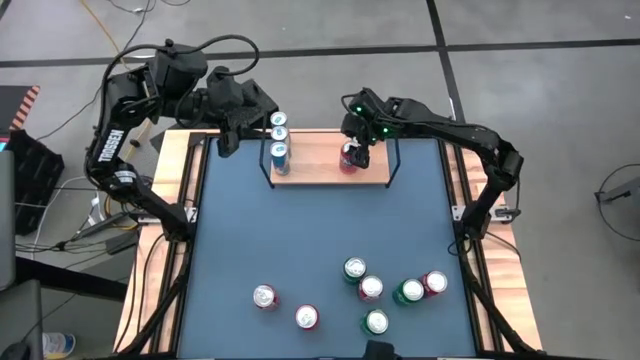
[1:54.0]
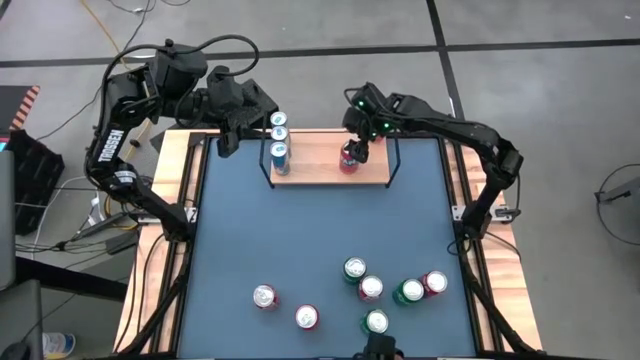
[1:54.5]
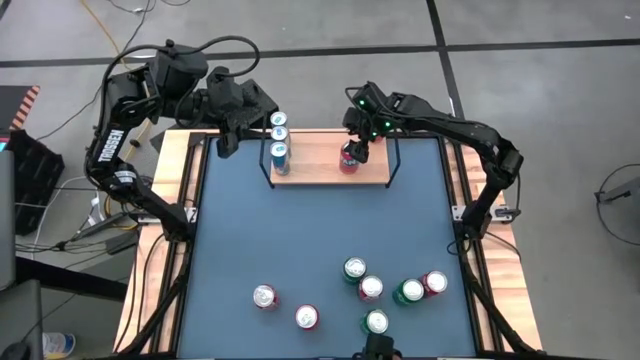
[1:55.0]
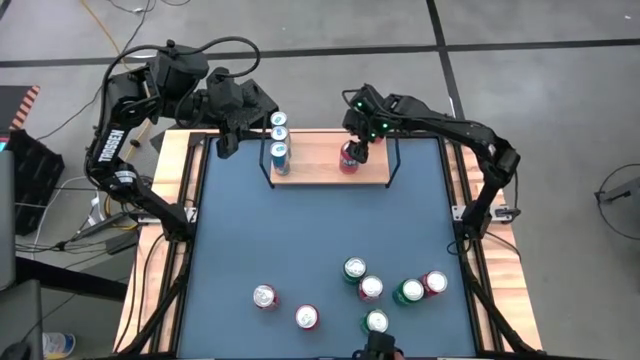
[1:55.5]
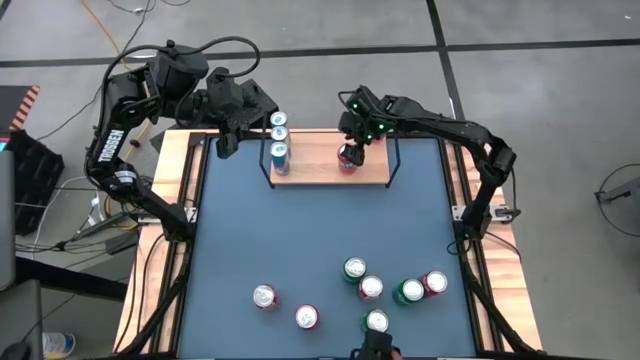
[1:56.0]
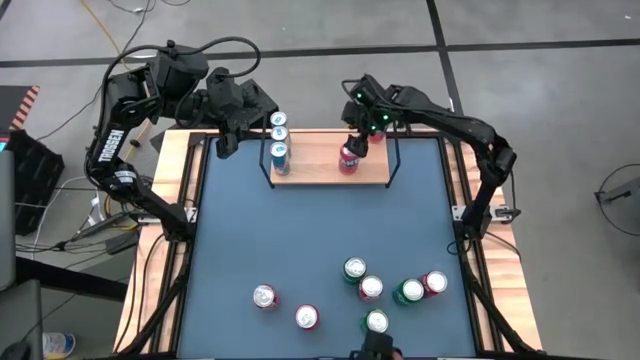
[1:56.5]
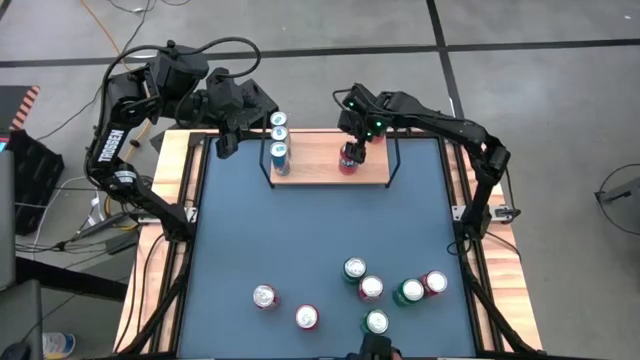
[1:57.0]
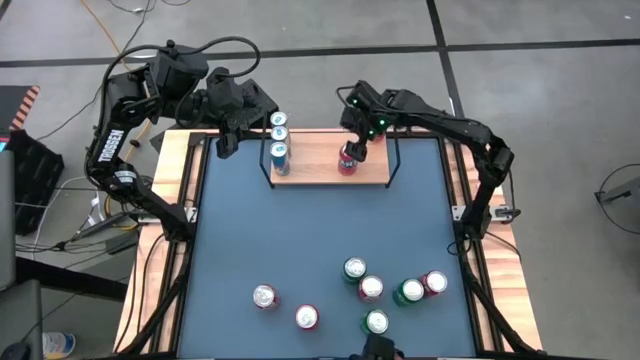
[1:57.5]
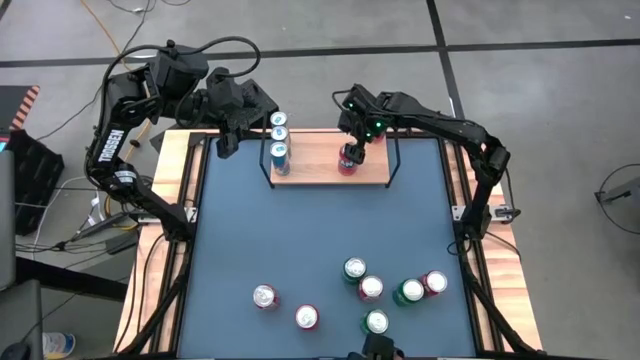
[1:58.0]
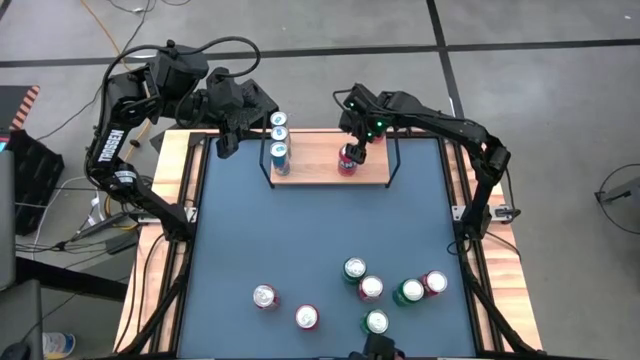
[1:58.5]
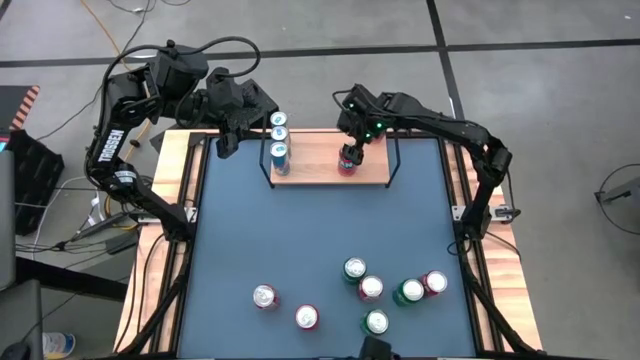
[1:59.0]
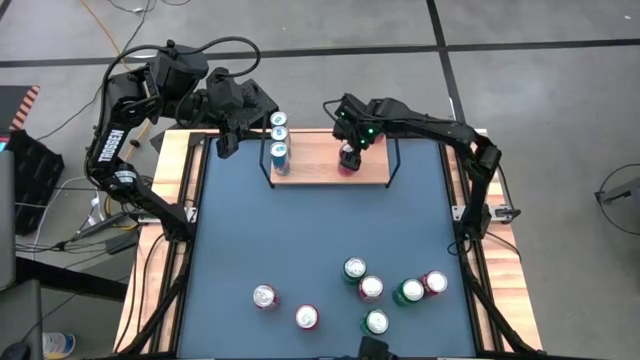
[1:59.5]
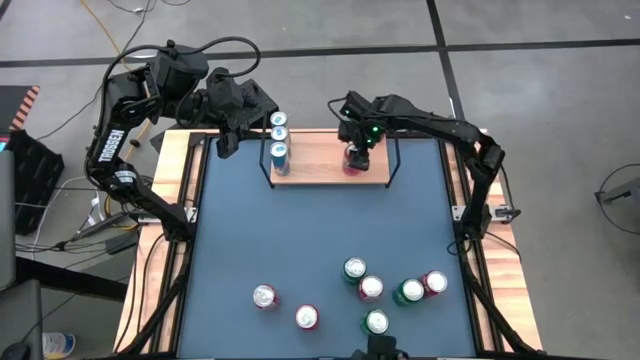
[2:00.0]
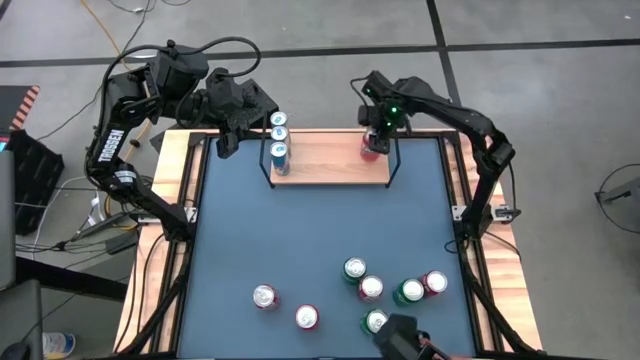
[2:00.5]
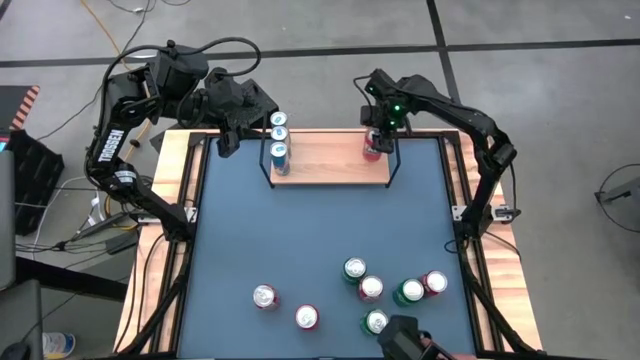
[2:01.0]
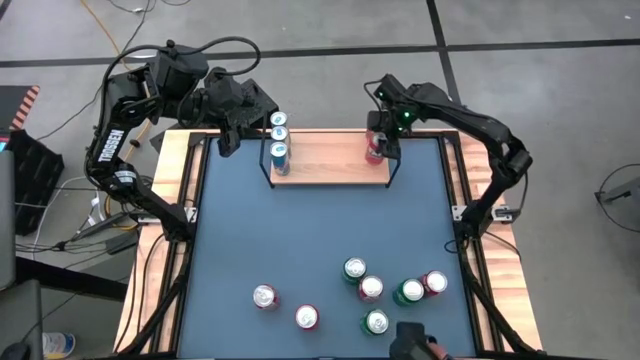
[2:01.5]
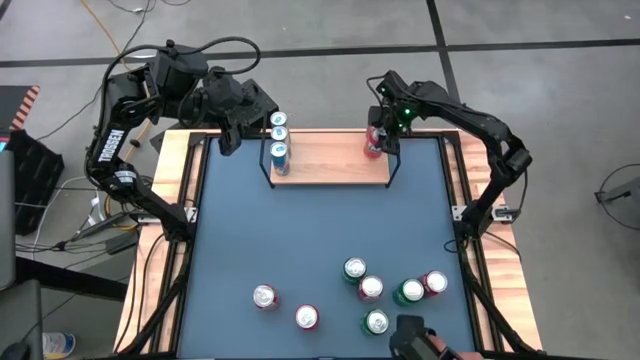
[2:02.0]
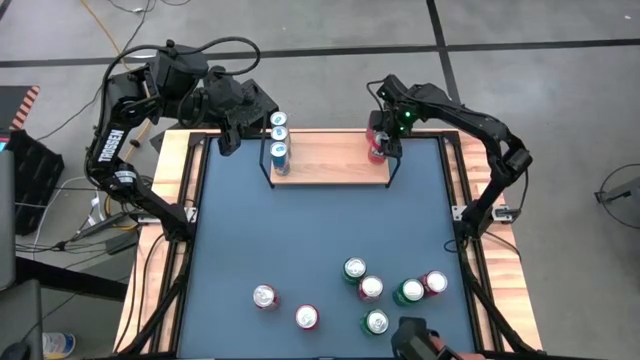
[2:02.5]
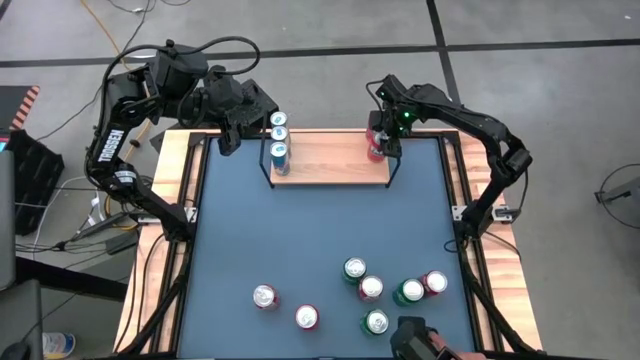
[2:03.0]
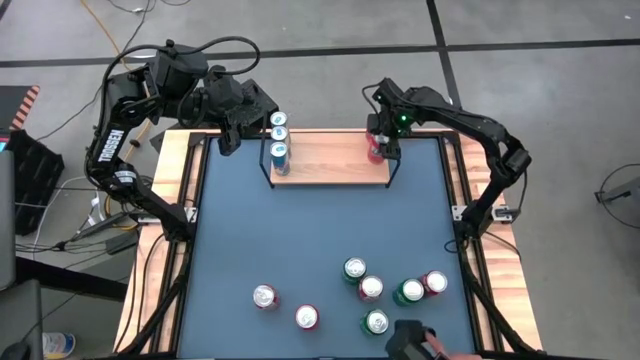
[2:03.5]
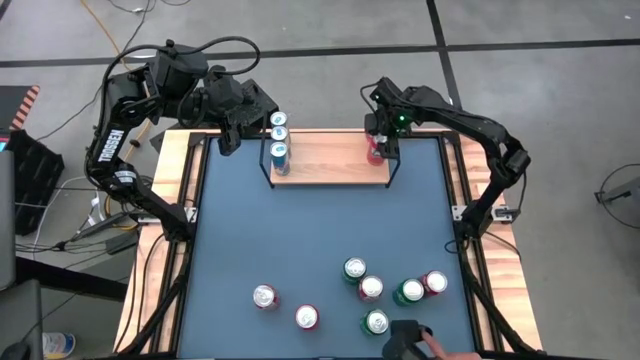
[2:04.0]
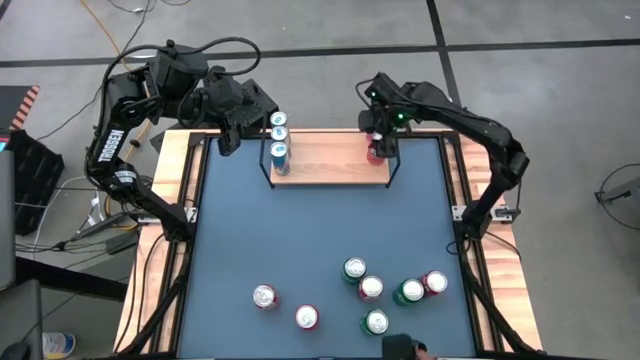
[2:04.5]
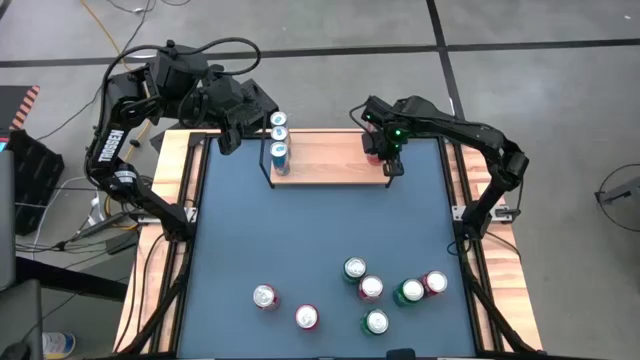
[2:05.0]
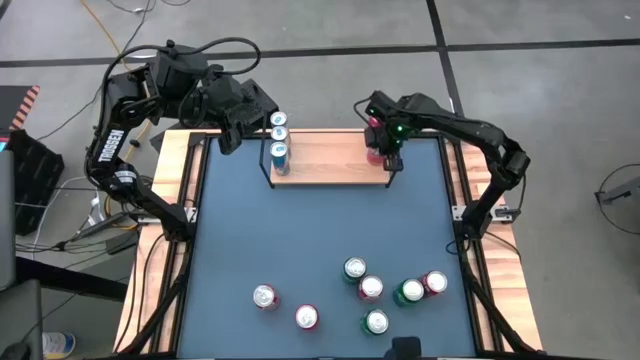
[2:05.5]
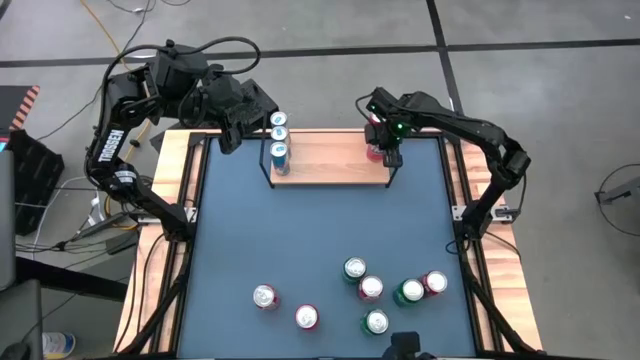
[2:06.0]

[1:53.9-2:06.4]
Task: Place canned beverage on shelf
Put the top red soda can on the shelf aligned with the other red soda can
